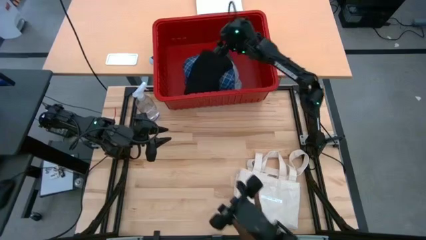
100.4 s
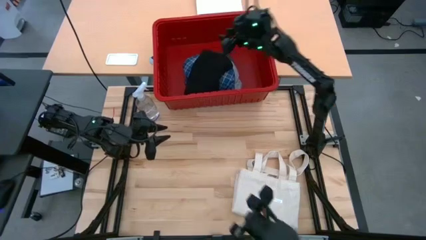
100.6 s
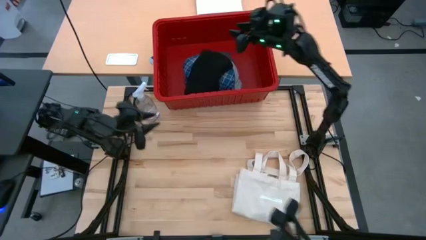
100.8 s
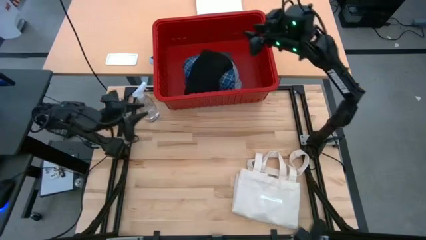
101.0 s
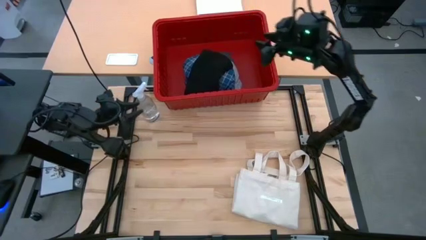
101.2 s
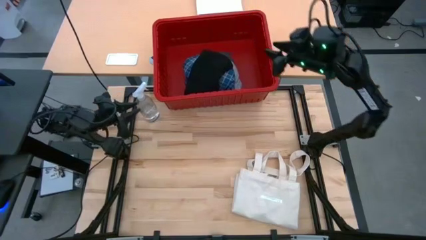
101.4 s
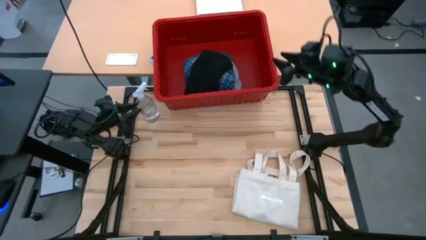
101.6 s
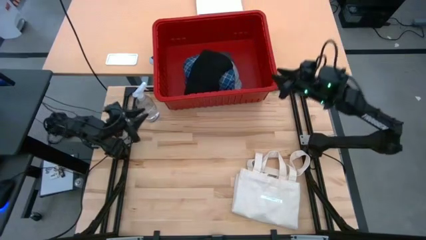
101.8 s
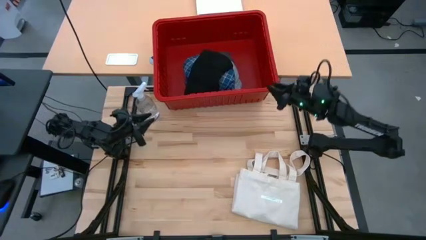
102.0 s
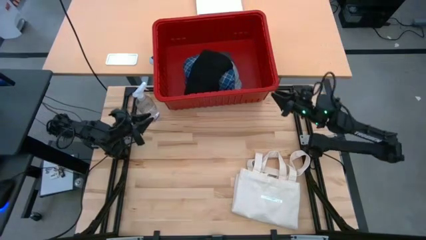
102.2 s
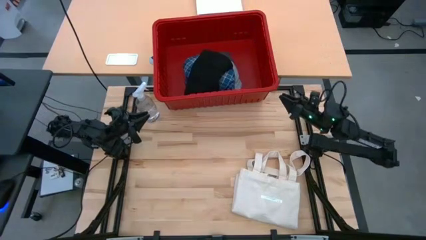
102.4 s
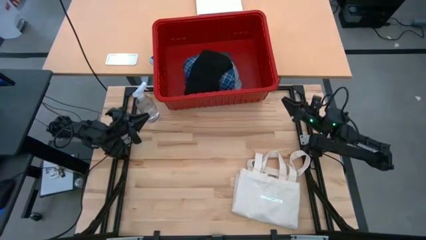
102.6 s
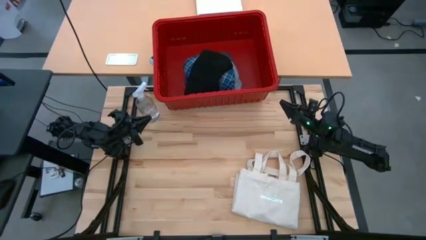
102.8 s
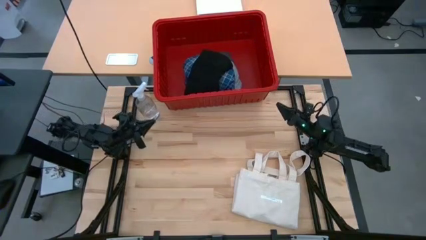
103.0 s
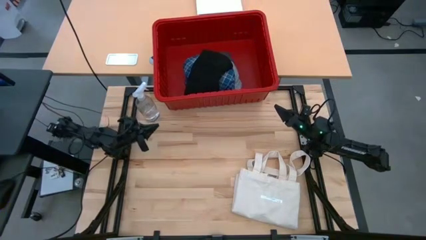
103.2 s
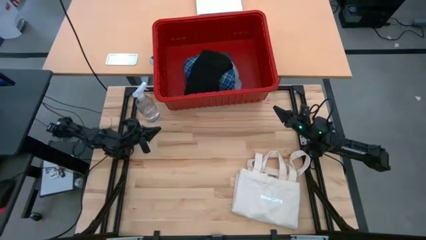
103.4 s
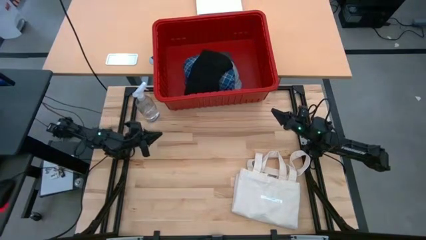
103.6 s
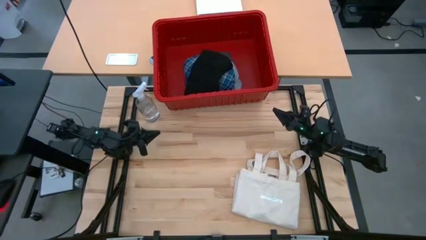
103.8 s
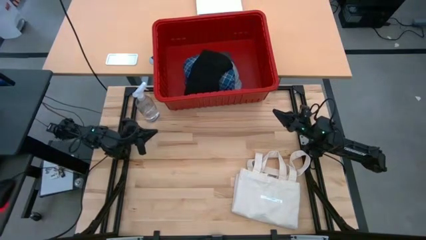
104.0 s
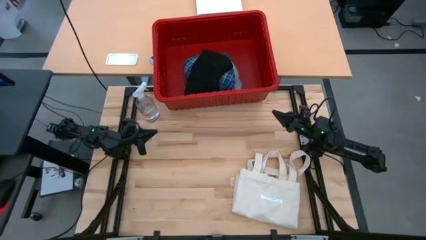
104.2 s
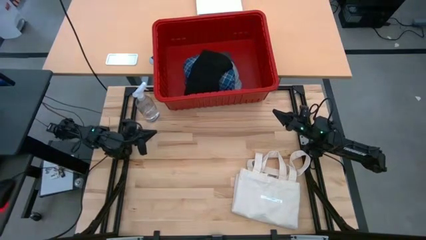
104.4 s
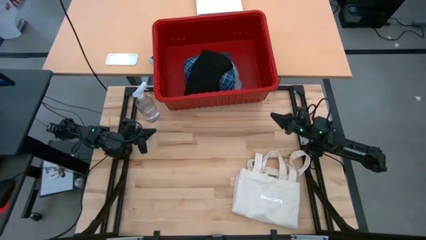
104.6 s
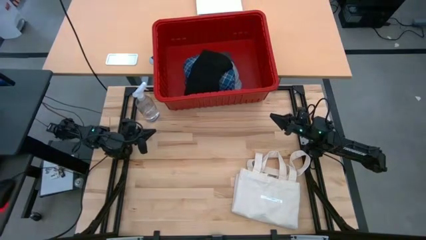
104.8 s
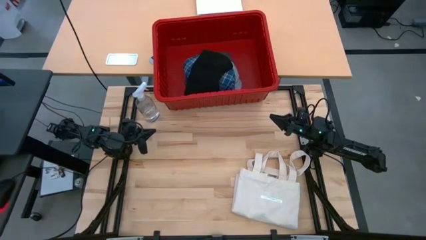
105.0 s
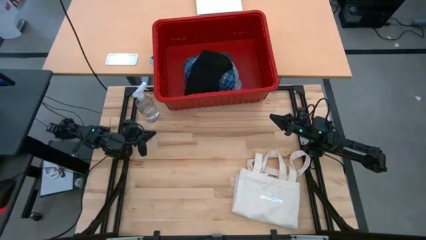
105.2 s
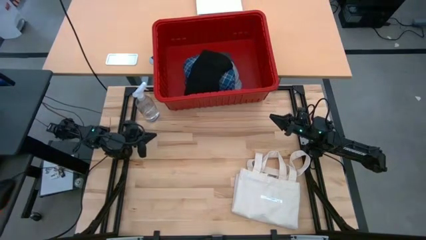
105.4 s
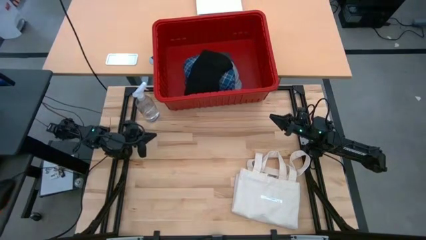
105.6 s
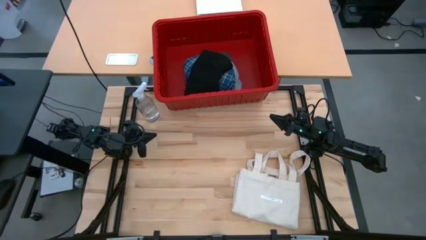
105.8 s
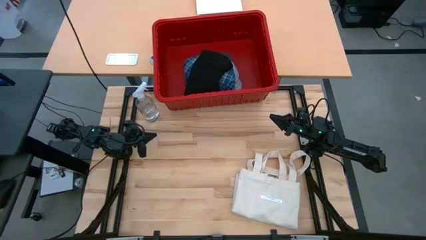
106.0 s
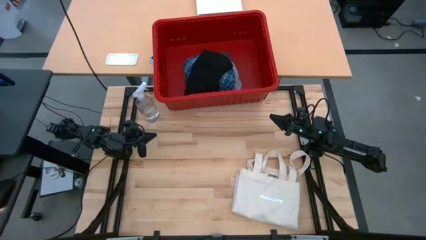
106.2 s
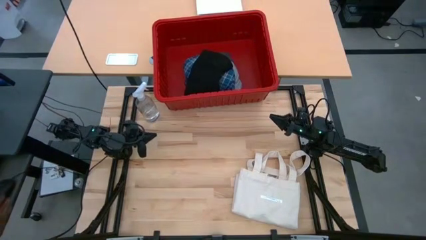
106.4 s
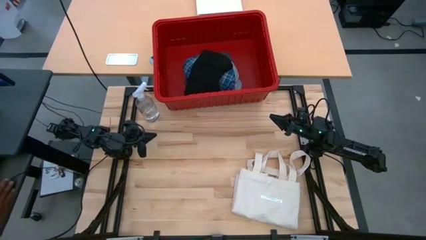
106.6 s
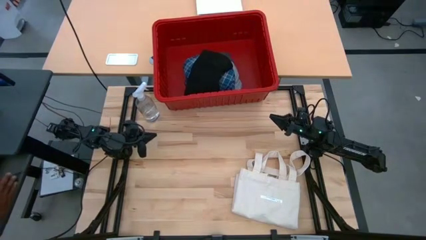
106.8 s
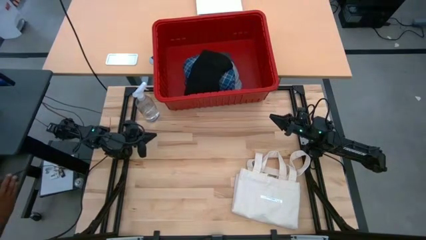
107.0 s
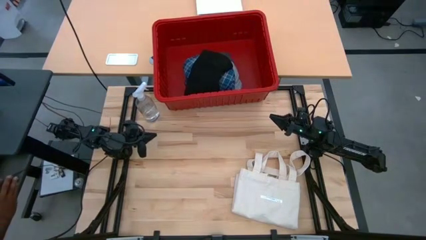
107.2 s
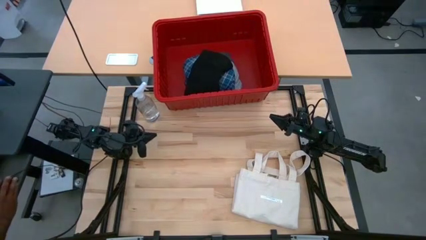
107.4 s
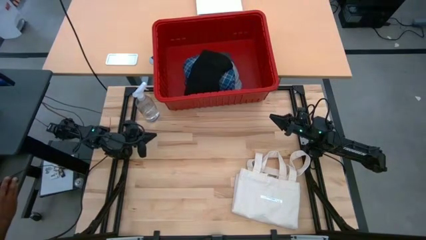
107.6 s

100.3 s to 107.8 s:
Task: Fold laundry
Return to Home Position

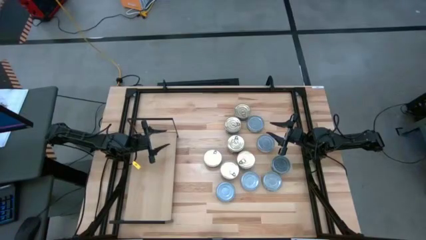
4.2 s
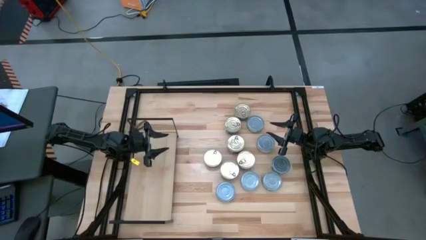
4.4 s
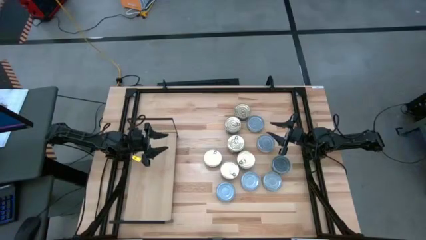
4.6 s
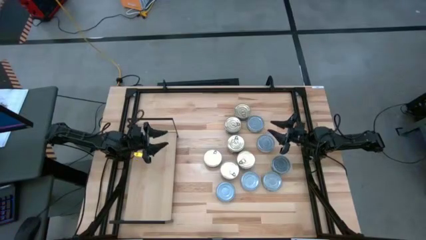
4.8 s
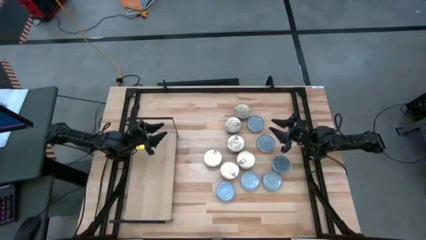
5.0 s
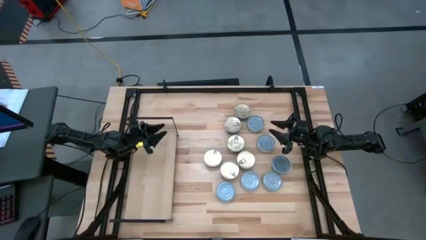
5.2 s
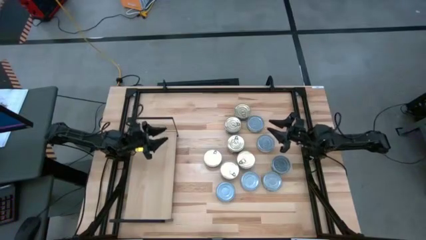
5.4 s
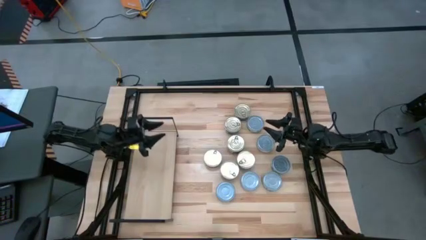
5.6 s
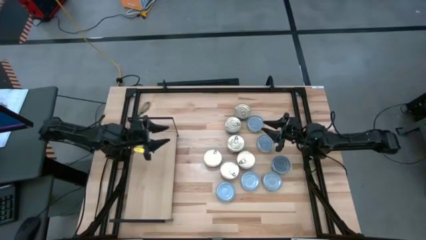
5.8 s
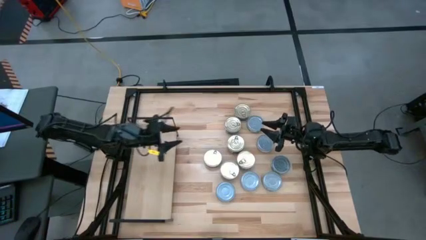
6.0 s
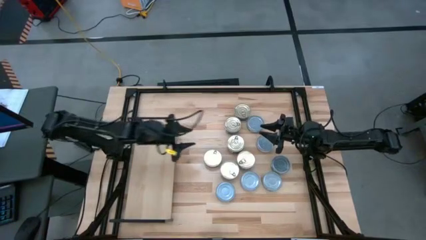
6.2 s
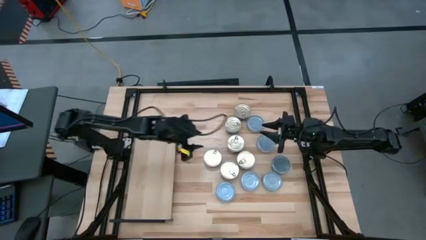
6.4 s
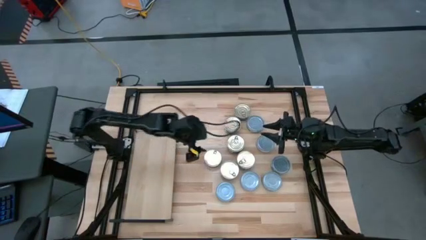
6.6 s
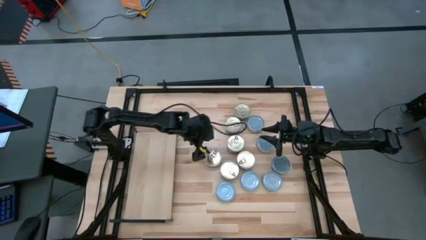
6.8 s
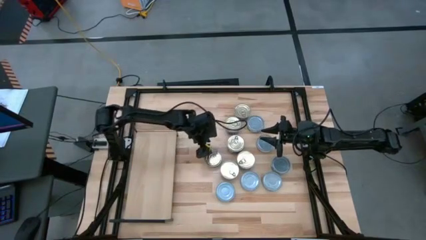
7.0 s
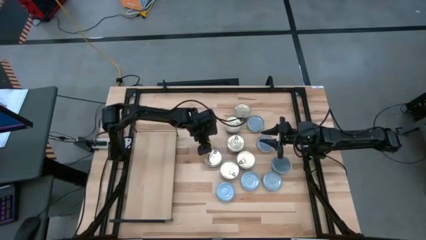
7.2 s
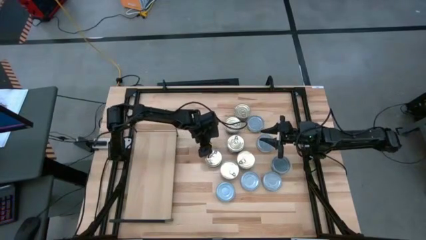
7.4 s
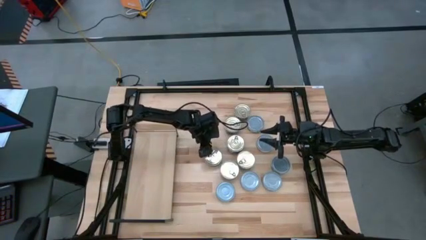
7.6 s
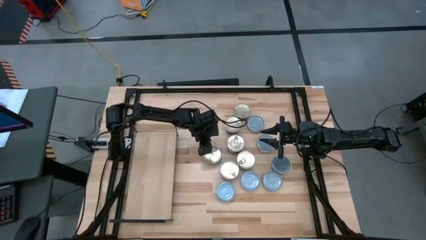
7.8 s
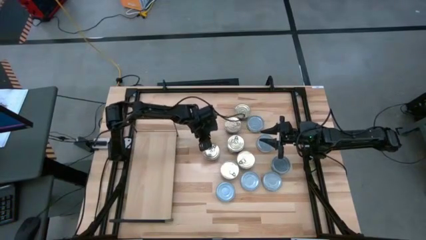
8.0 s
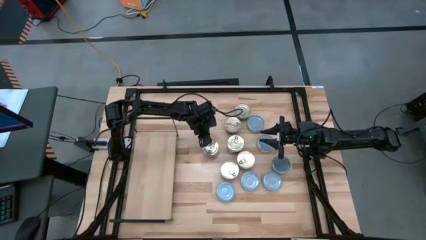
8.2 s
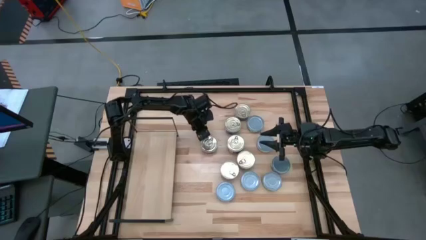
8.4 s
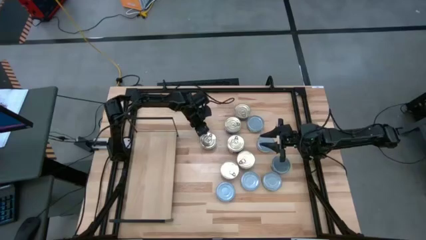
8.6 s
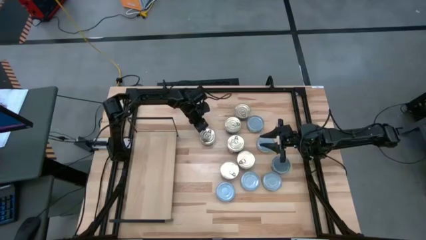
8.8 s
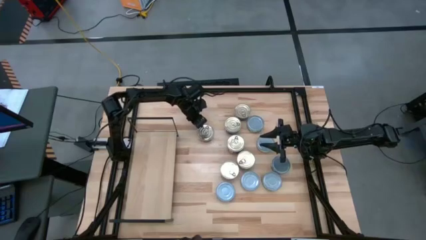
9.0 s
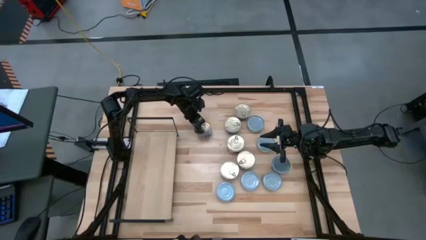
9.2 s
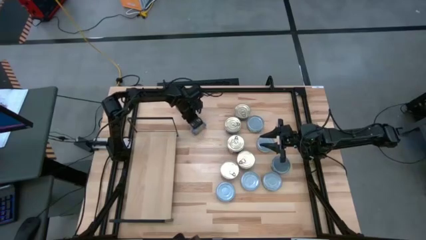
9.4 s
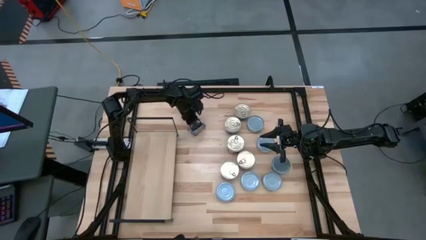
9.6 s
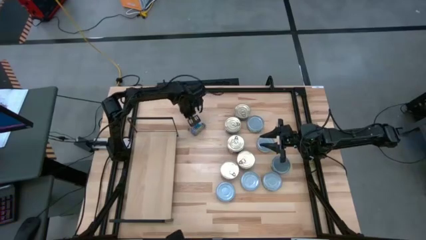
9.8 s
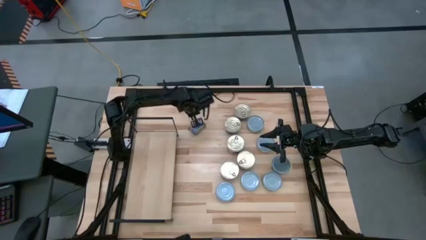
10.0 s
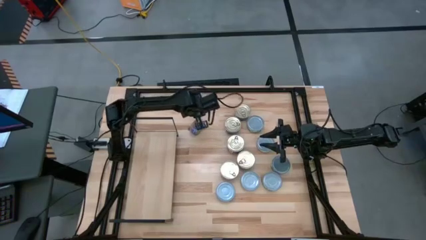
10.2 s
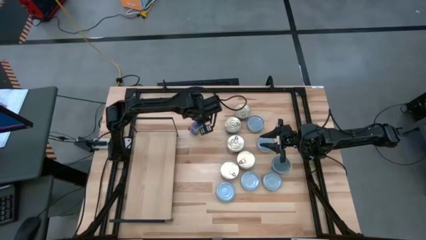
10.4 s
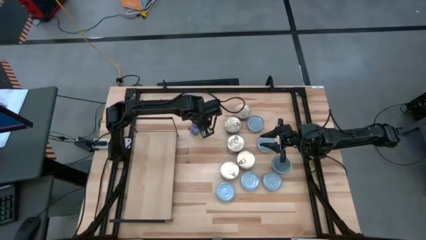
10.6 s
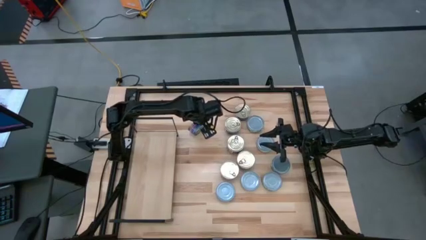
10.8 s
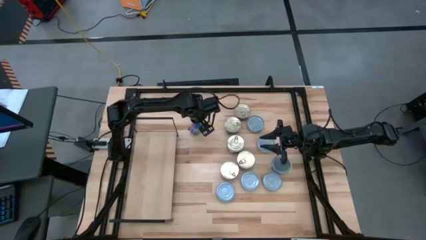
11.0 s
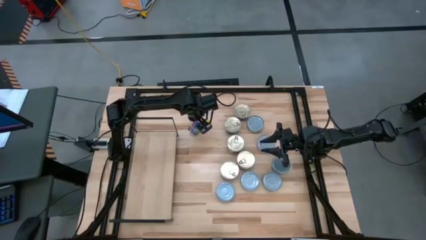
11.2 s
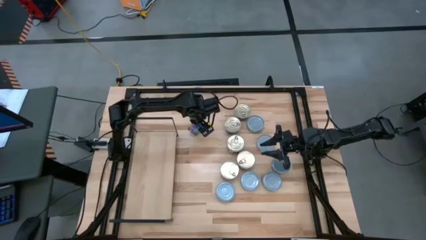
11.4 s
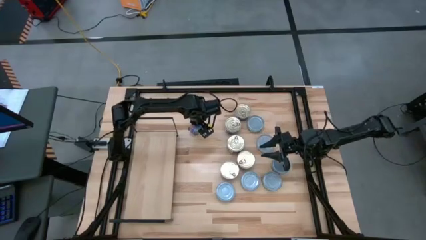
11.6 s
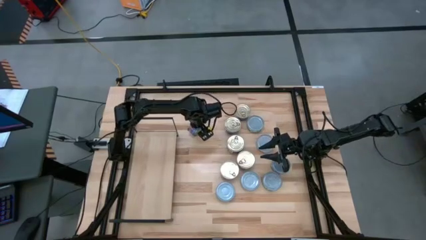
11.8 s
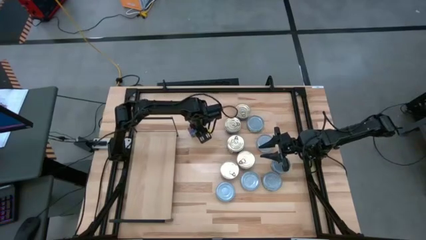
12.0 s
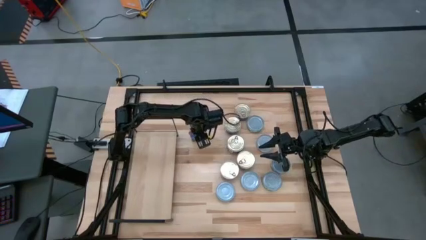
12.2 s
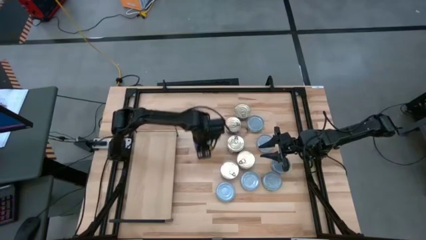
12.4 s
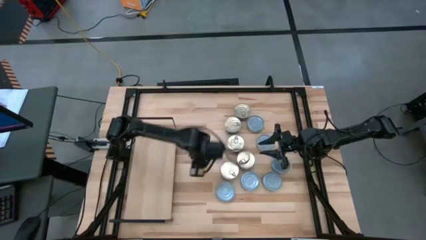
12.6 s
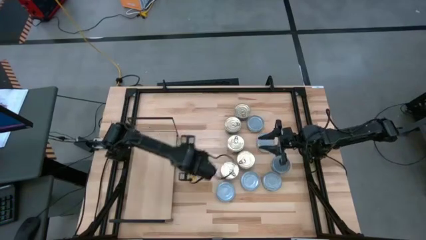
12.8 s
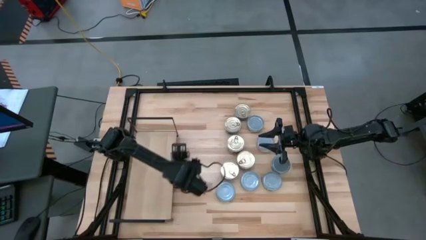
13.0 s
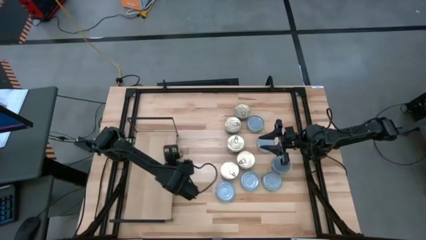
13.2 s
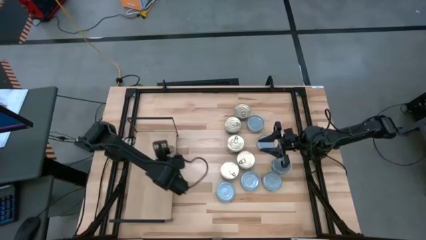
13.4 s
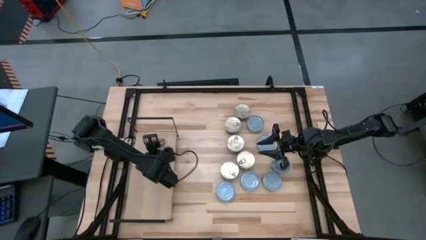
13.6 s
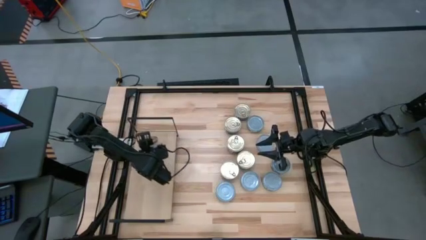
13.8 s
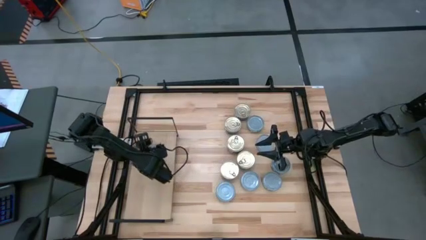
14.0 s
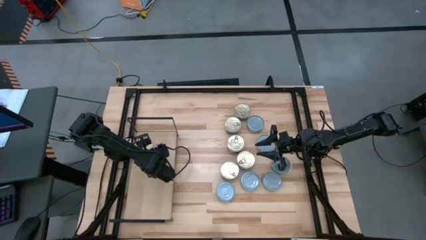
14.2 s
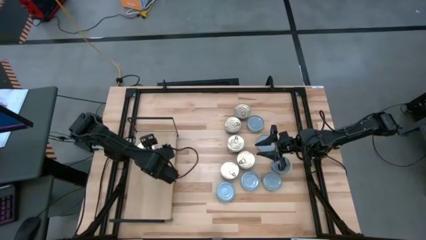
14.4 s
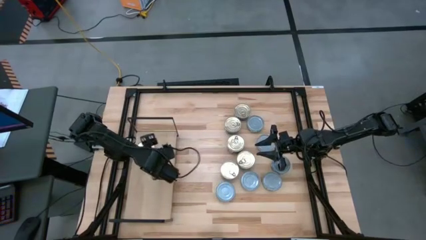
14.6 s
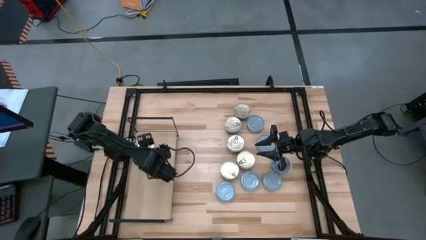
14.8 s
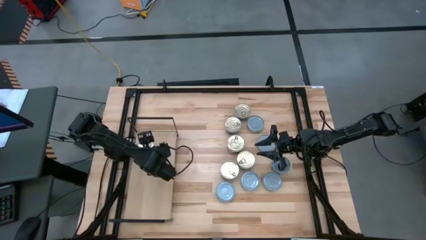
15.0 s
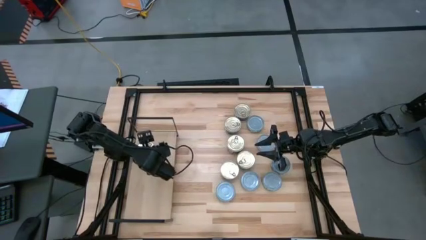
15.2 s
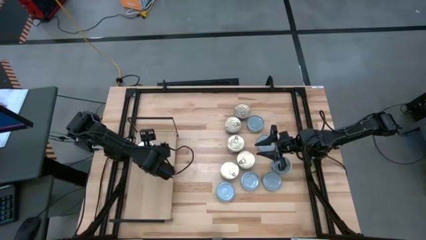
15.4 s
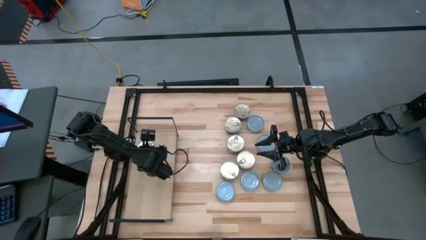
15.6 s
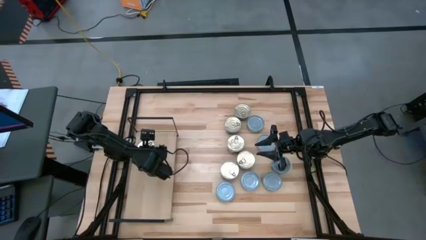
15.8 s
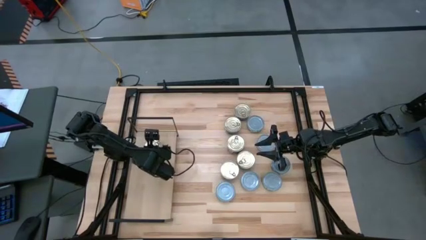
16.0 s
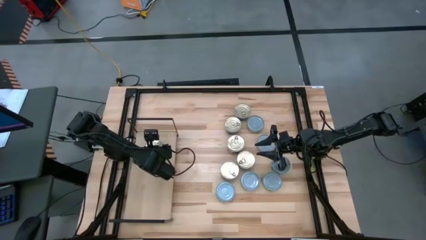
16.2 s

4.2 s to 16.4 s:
Task: Stack canned seafood by type on shelf
Put the blue and pink tuna can on the shelf
